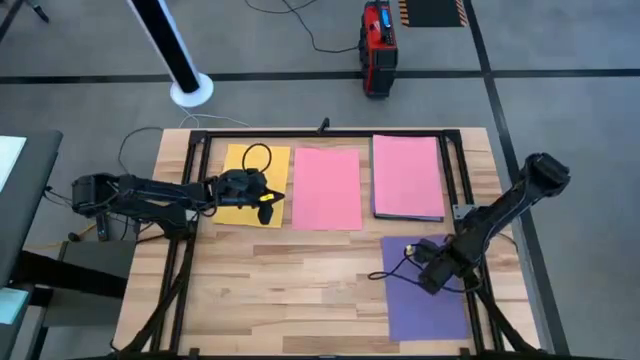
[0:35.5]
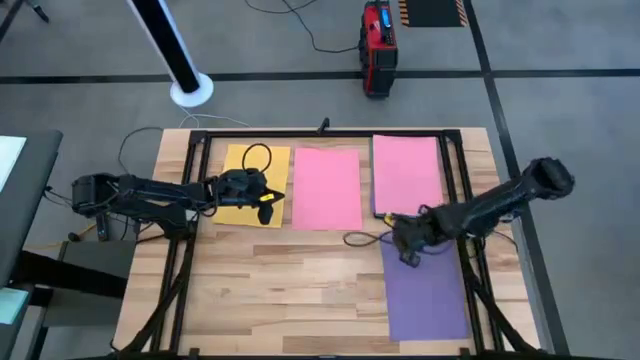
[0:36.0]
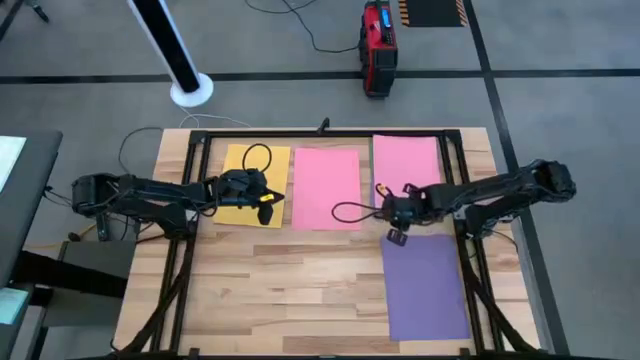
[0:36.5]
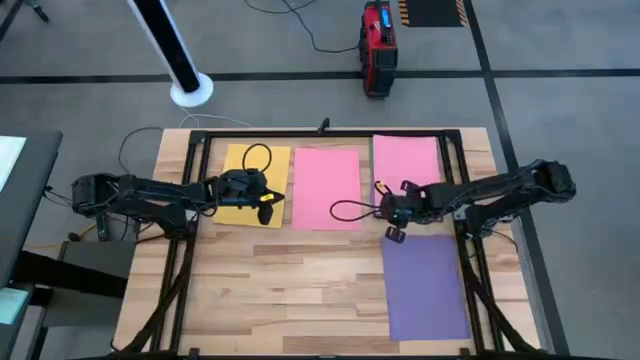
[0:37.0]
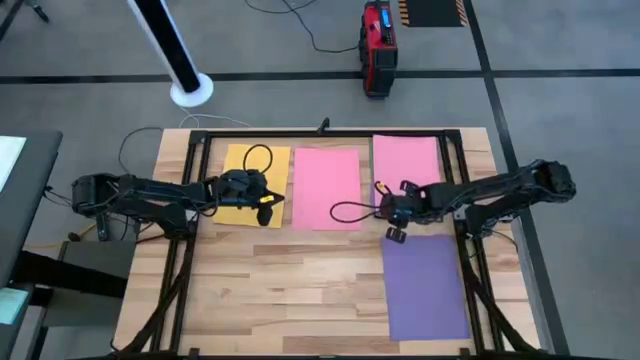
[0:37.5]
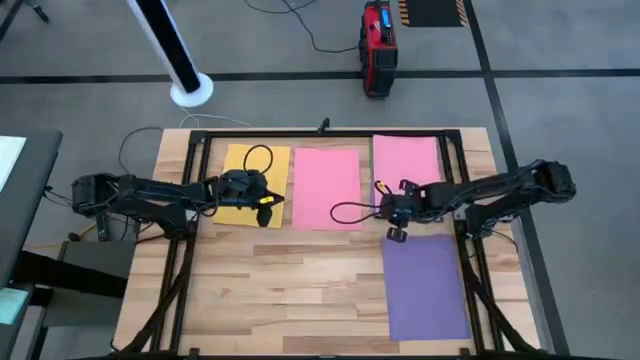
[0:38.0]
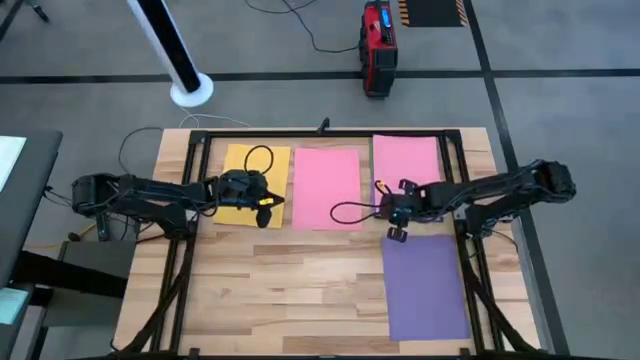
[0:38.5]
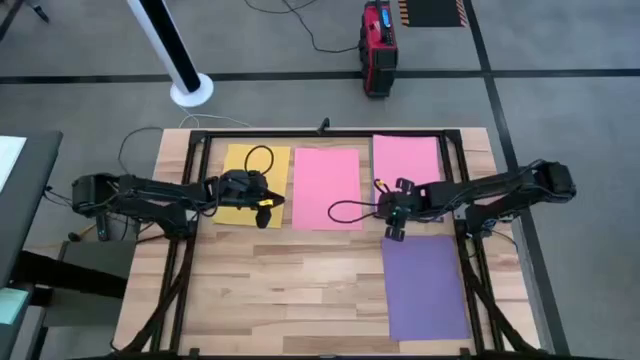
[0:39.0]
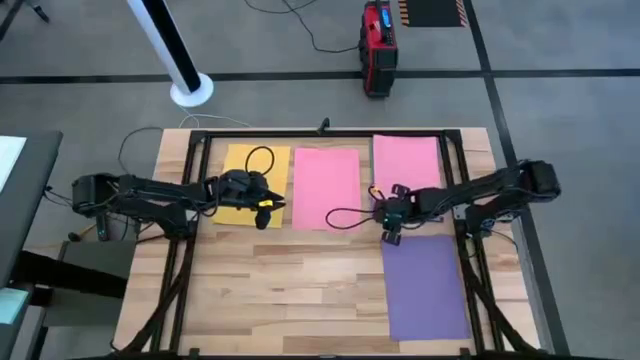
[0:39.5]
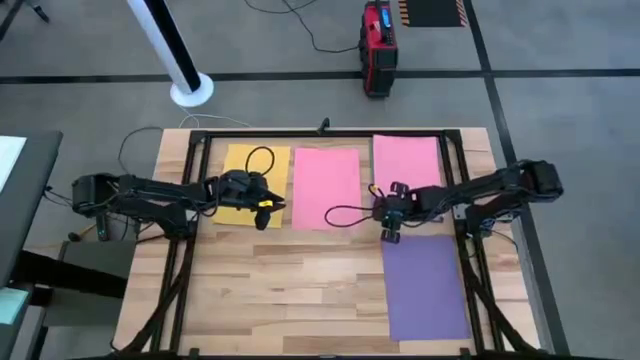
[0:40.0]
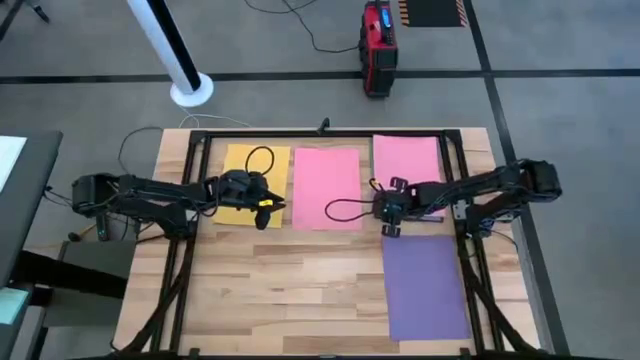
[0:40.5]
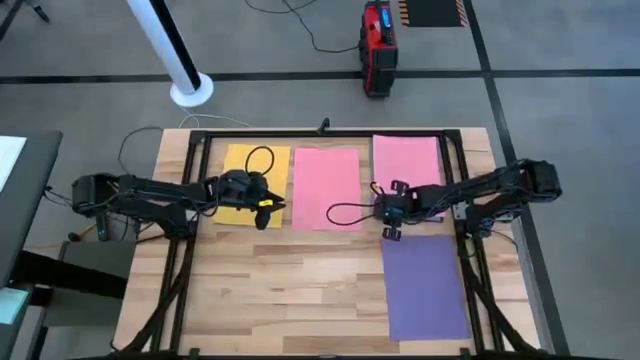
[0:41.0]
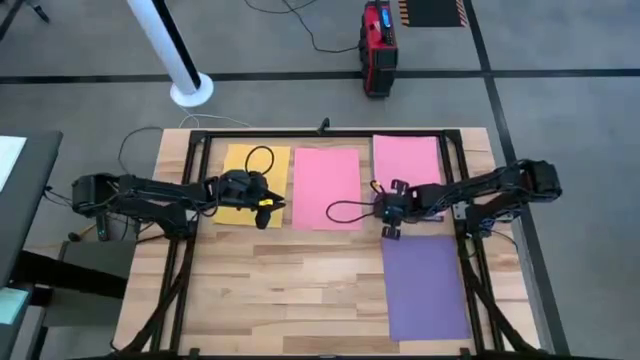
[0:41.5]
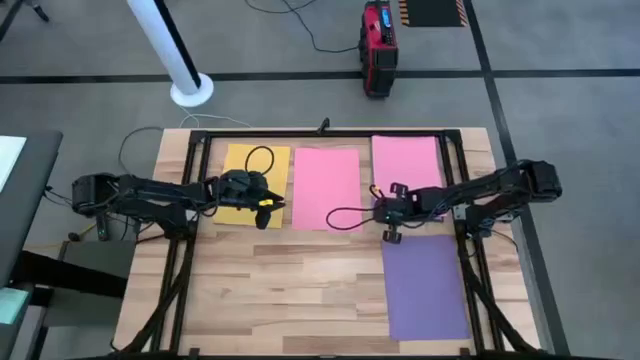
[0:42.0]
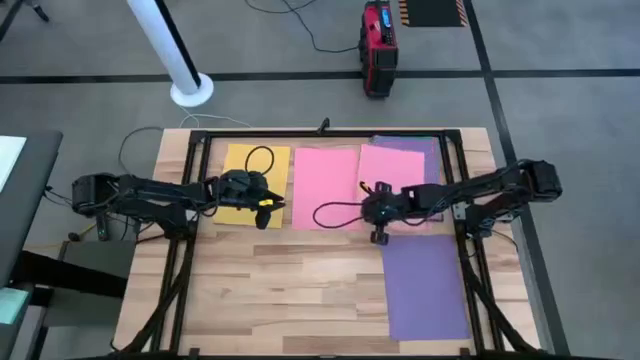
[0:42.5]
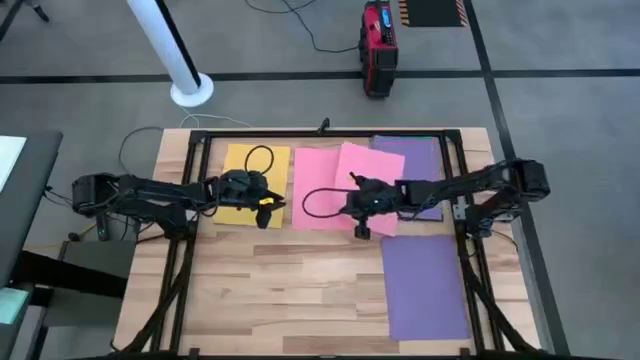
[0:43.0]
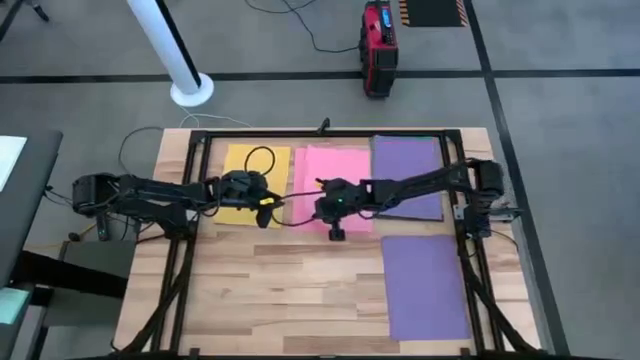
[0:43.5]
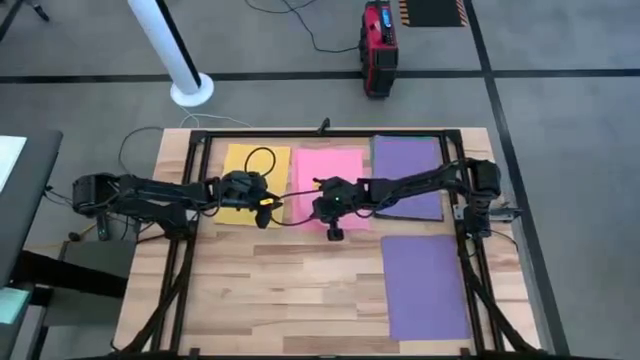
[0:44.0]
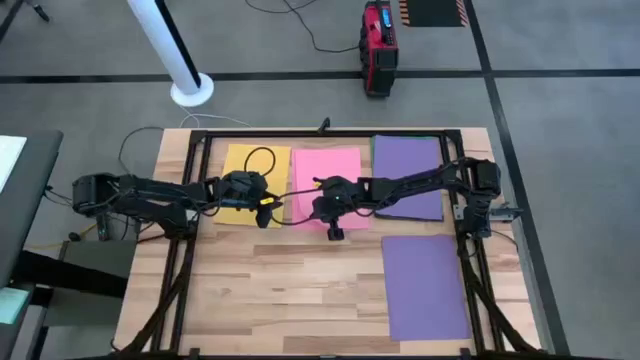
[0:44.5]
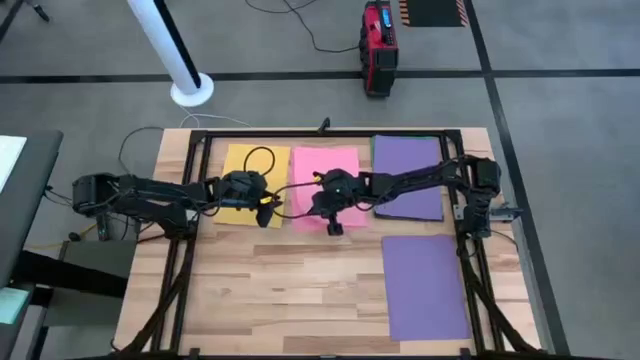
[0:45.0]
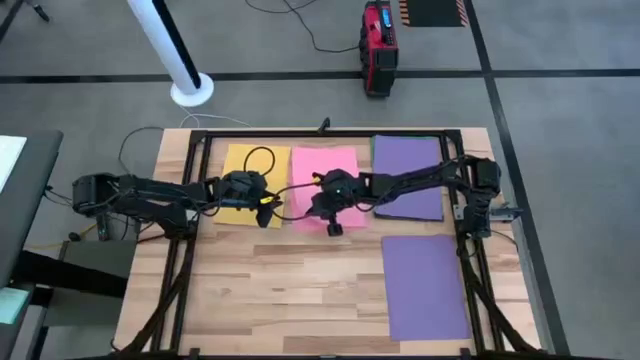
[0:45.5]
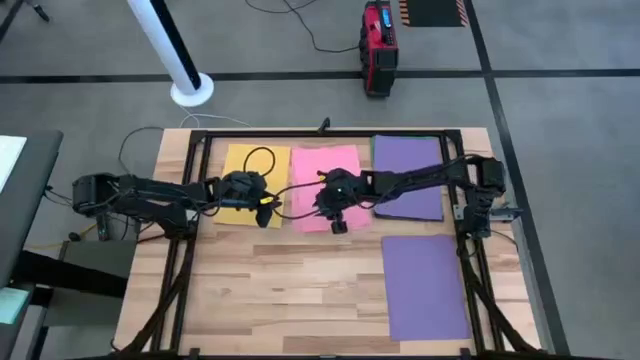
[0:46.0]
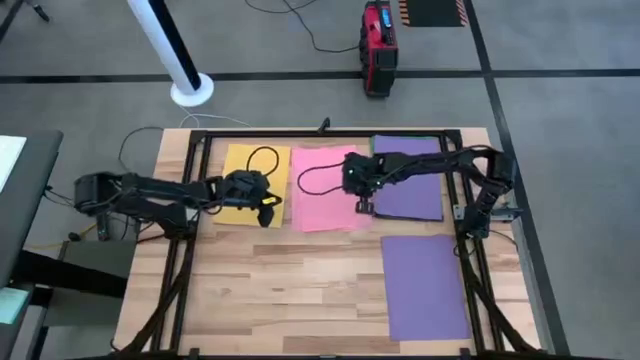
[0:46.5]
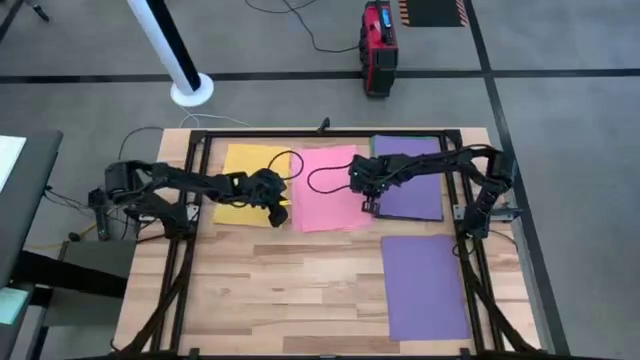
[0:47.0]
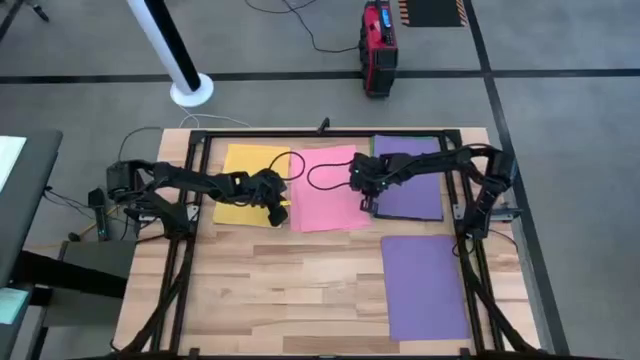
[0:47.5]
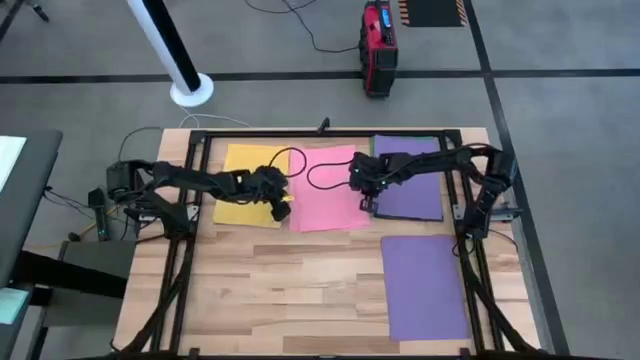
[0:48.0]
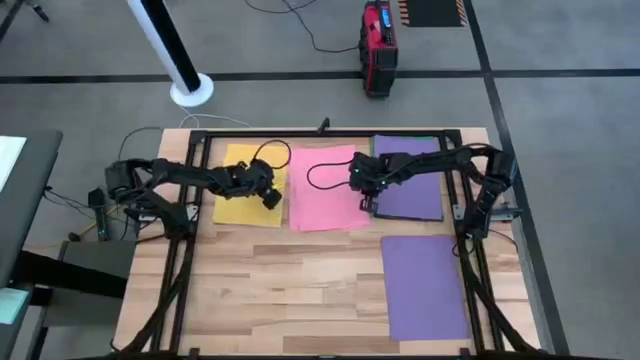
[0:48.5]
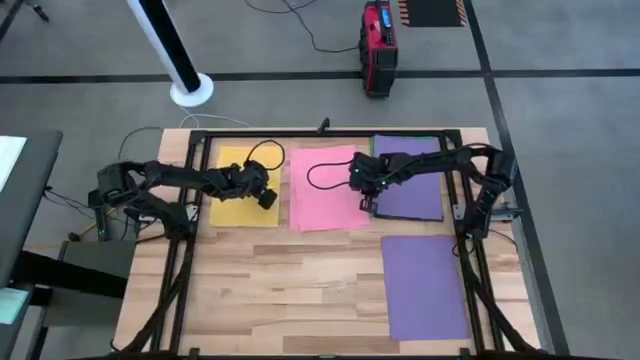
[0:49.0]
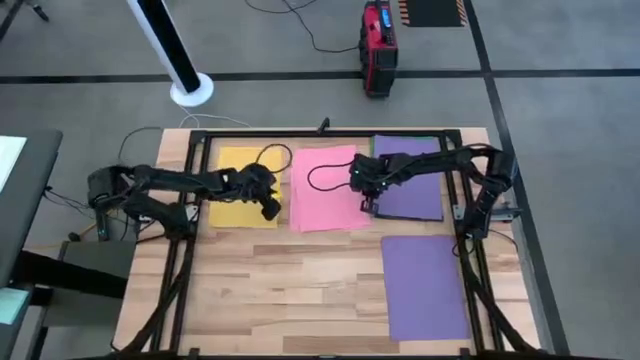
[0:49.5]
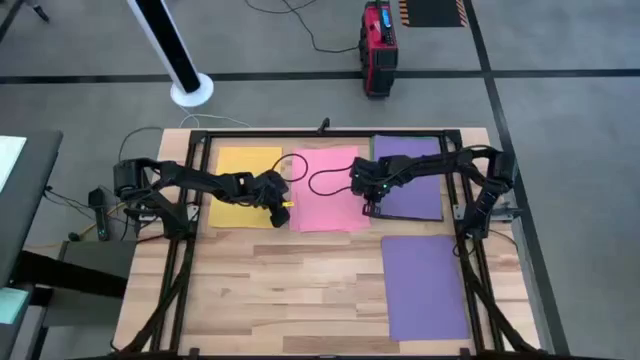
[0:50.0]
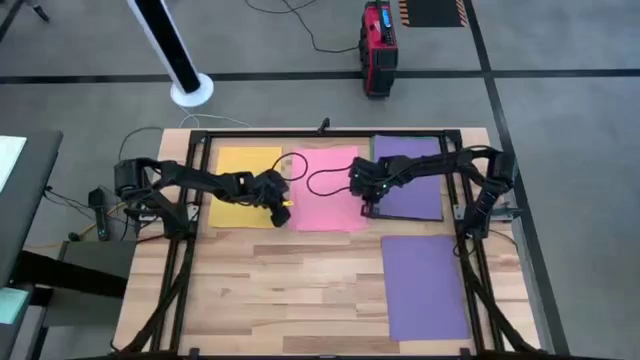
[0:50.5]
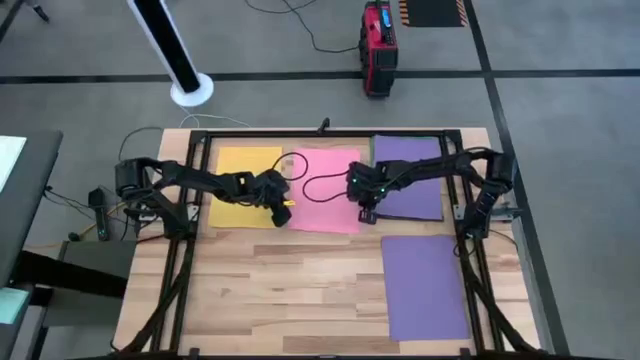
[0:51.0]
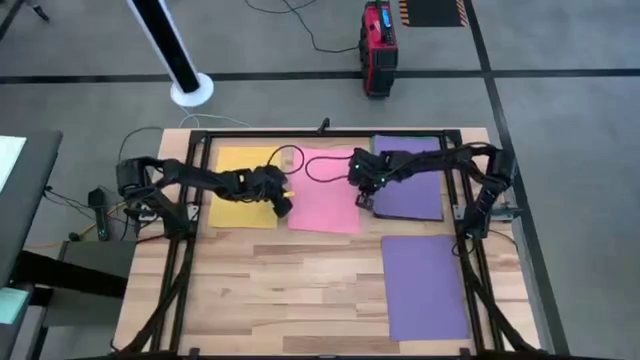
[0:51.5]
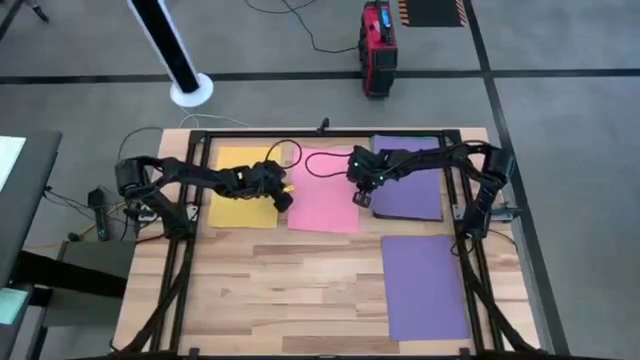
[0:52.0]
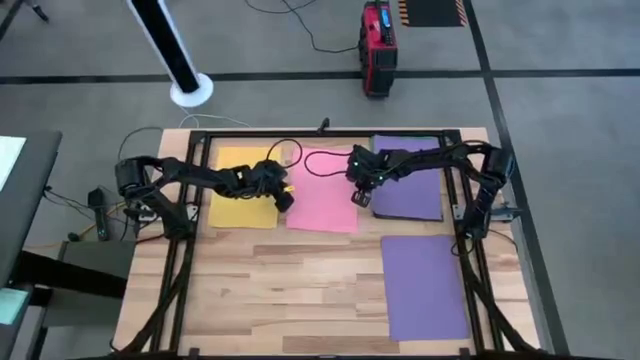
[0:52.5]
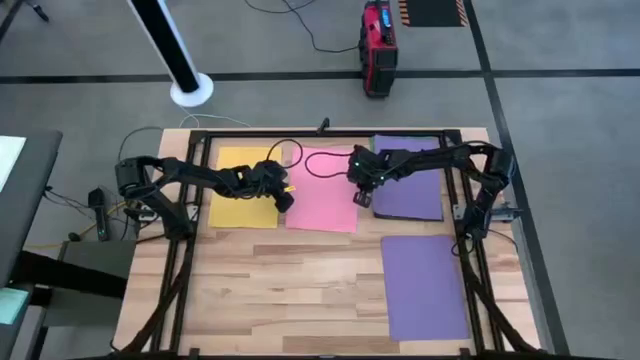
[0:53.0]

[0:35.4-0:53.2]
Task: Organize paper
Stack the right pink colored paper on top of the left pink colored paper

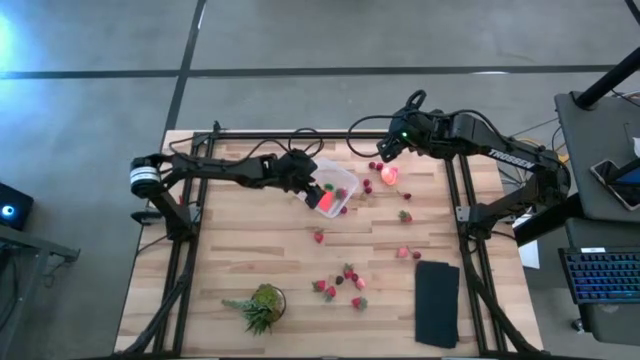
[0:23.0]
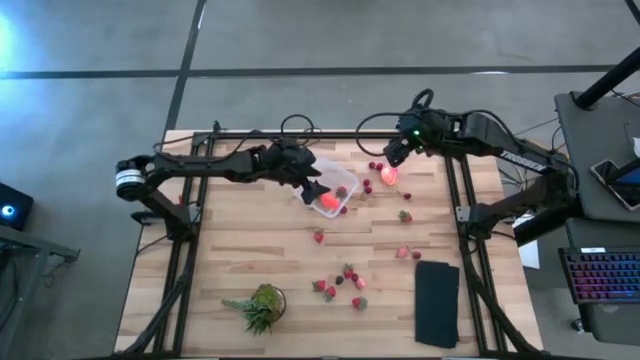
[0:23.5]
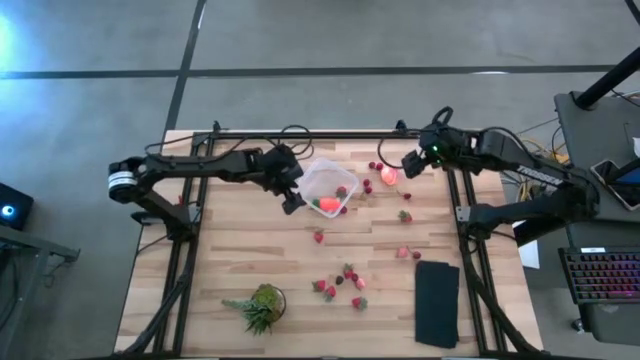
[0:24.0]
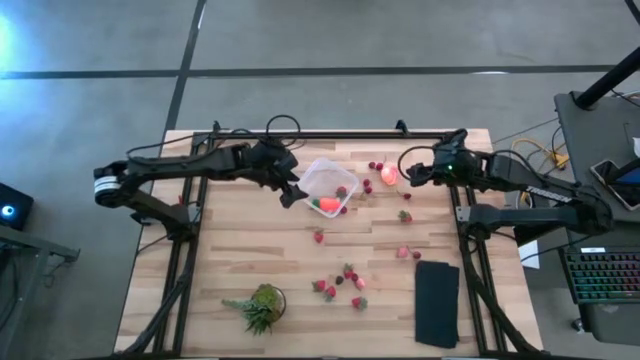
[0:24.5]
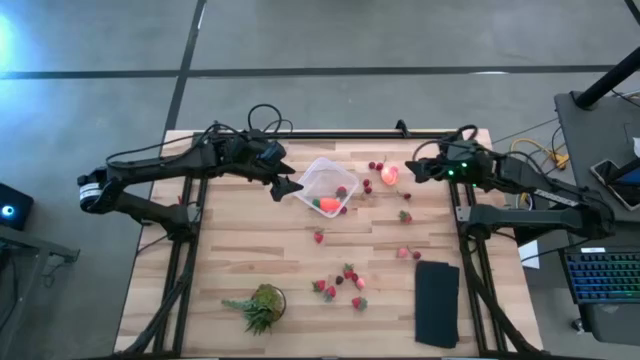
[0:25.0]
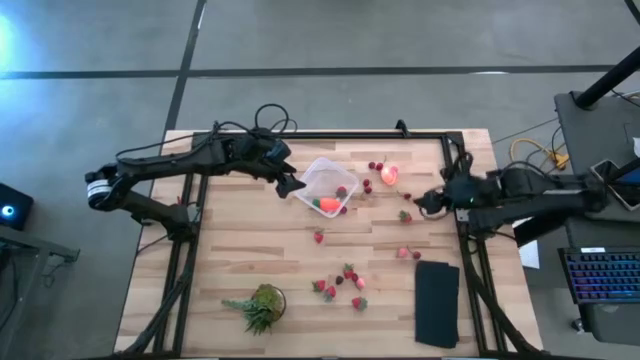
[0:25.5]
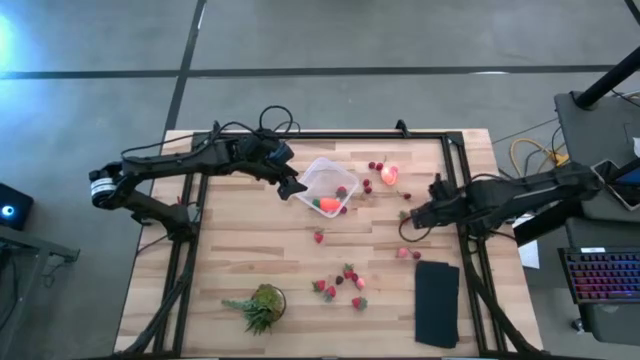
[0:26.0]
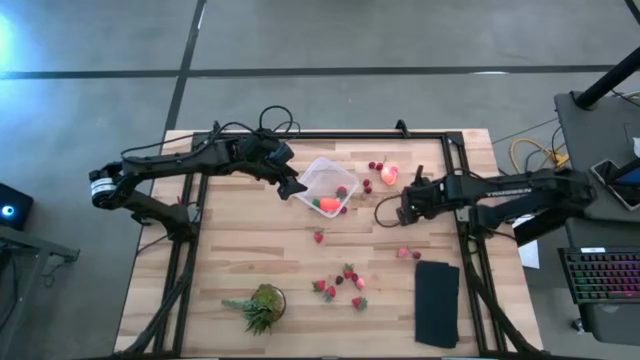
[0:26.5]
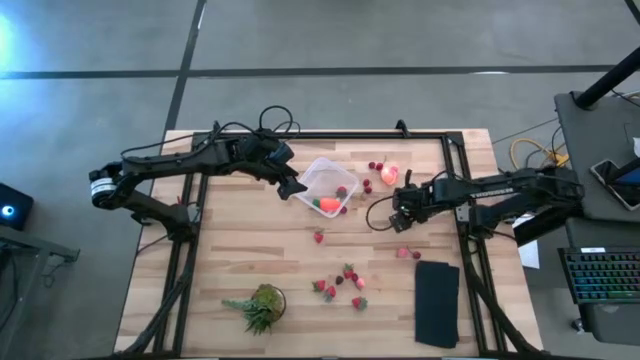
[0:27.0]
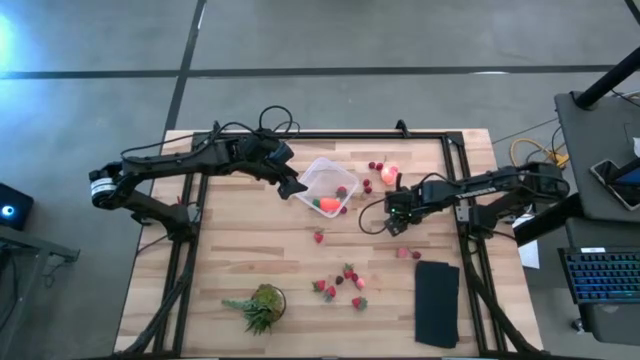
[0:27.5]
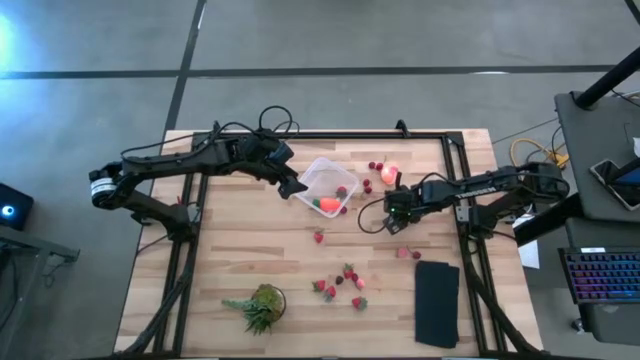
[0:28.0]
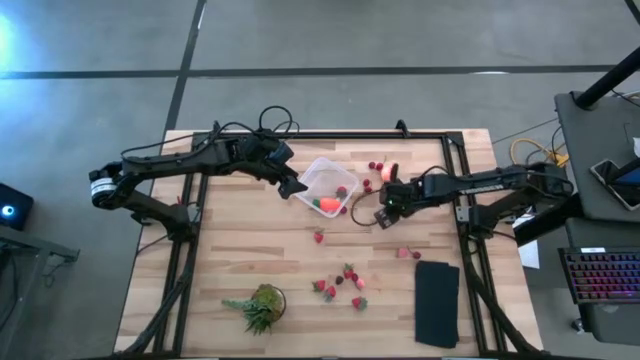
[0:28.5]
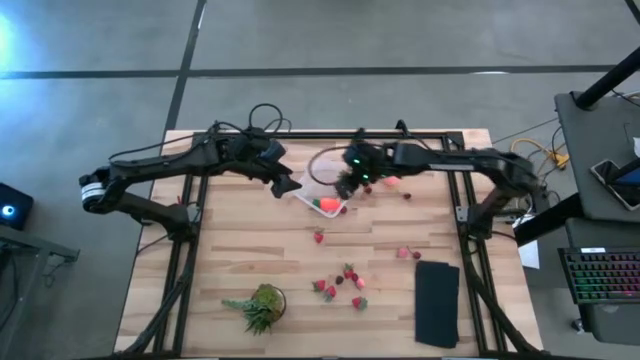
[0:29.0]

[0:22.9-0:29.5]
Task: Pick and placing Produce into tupperware
Put the red strawberry into the transparent bin
